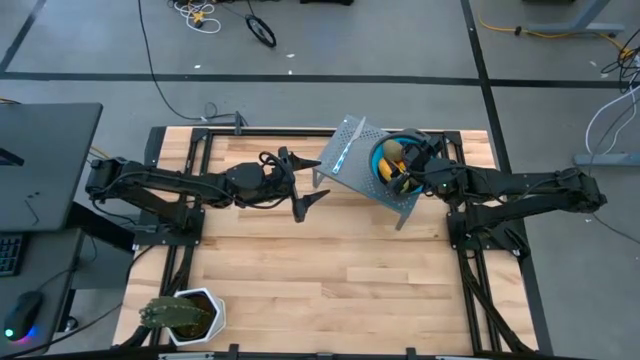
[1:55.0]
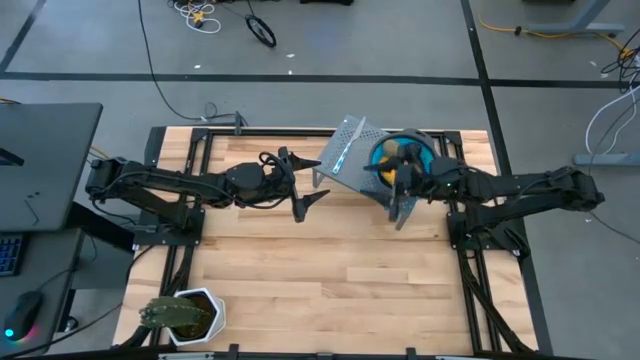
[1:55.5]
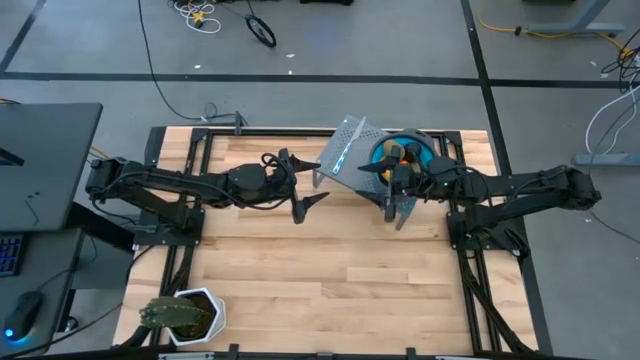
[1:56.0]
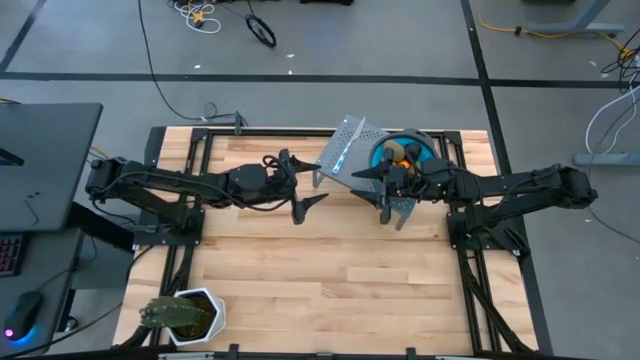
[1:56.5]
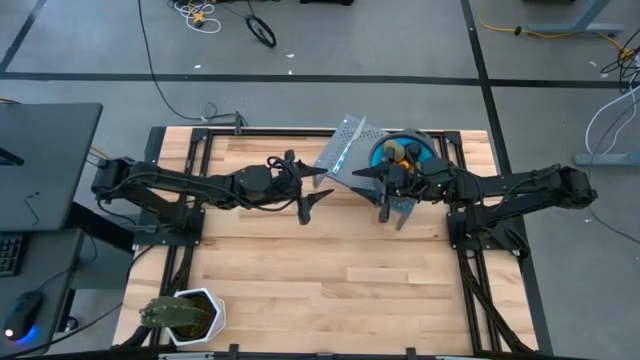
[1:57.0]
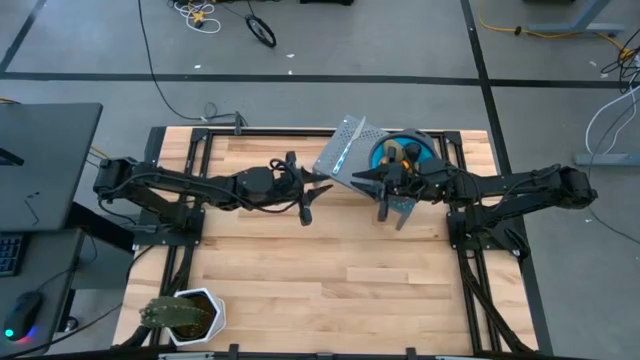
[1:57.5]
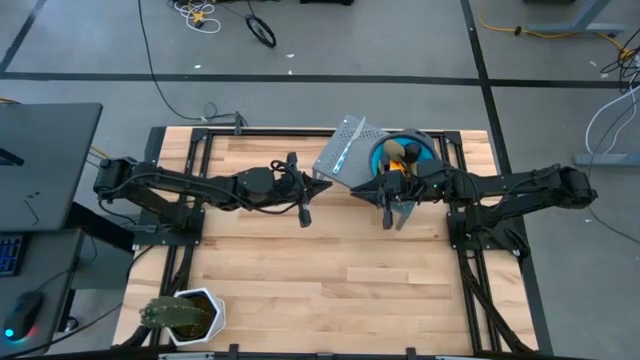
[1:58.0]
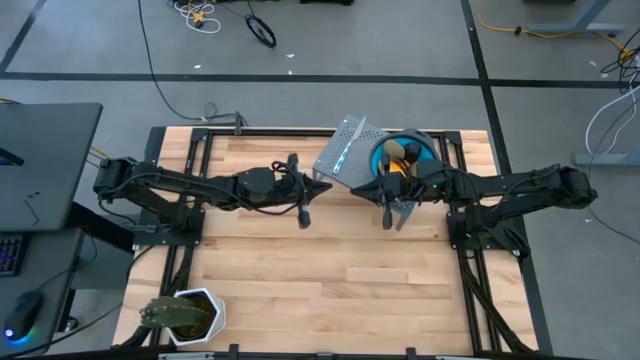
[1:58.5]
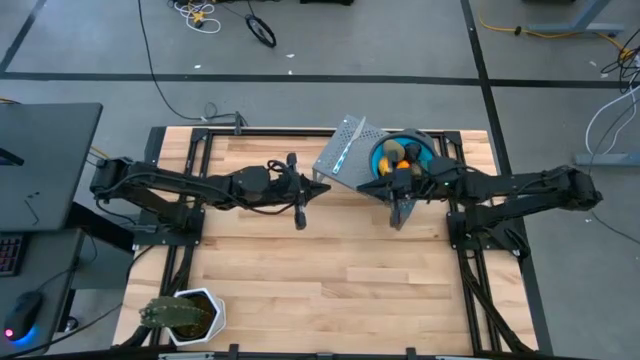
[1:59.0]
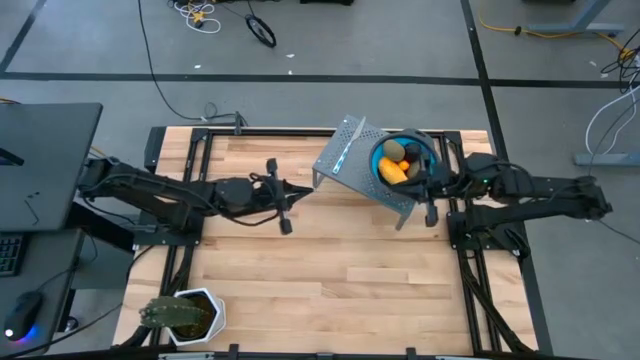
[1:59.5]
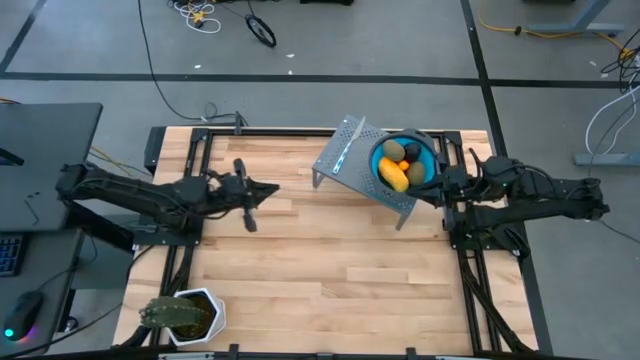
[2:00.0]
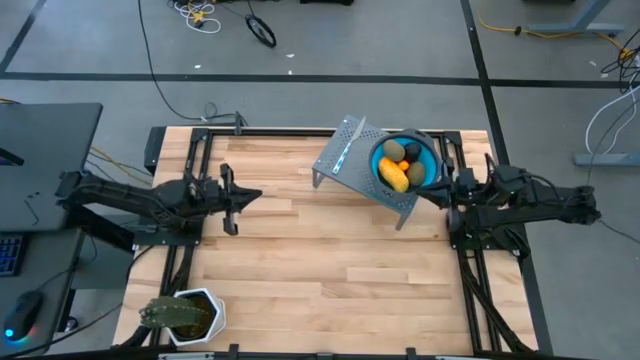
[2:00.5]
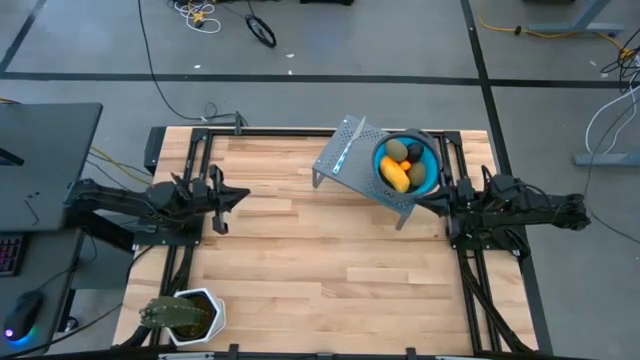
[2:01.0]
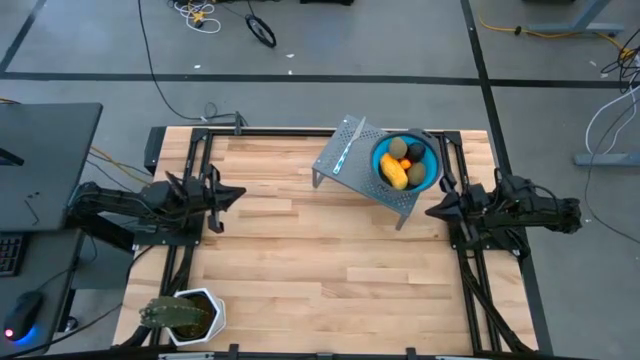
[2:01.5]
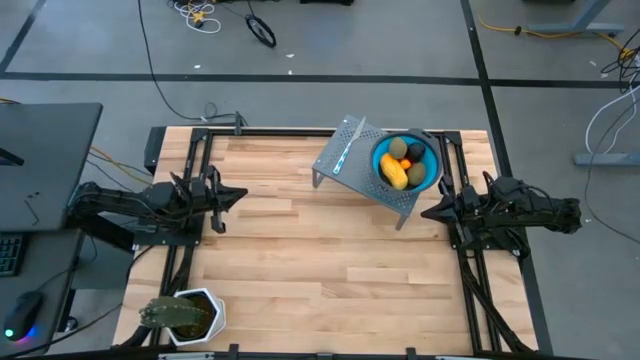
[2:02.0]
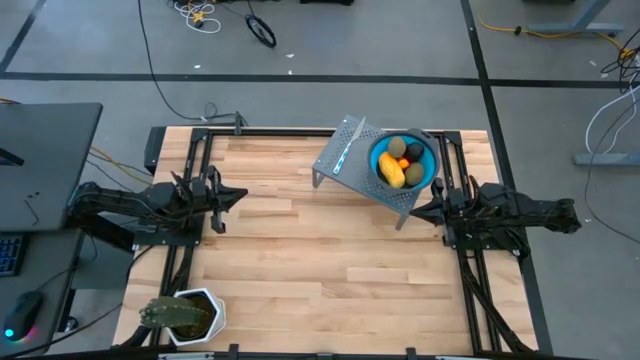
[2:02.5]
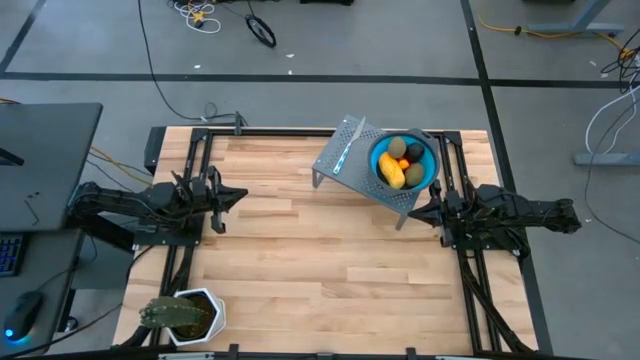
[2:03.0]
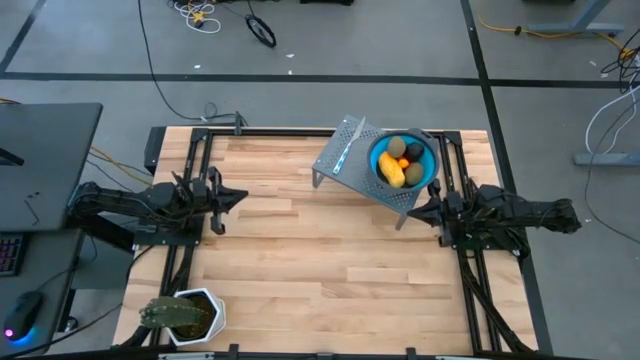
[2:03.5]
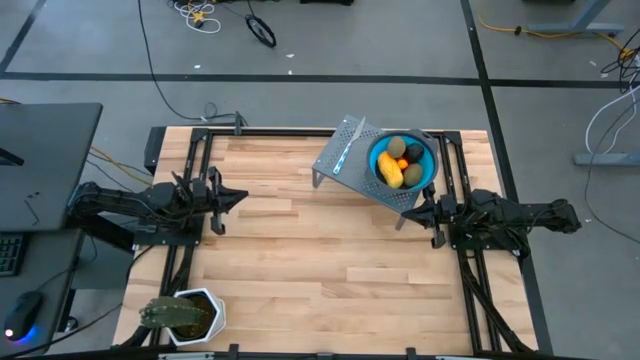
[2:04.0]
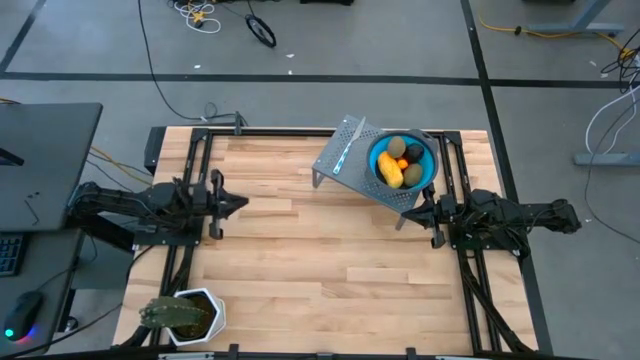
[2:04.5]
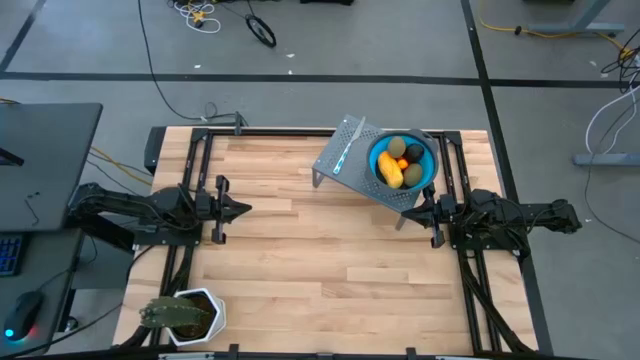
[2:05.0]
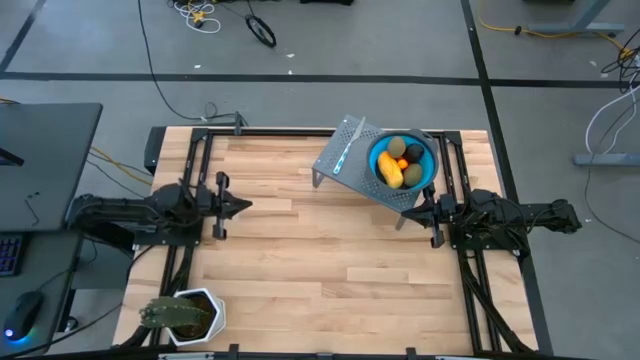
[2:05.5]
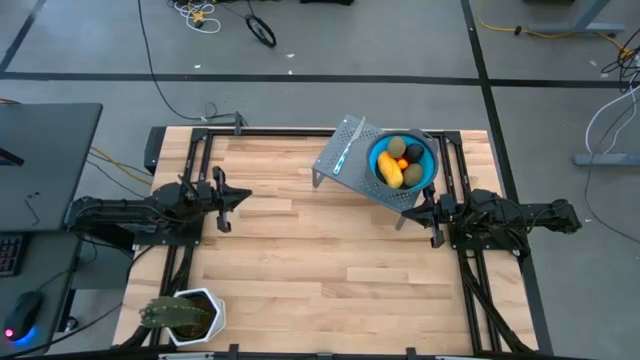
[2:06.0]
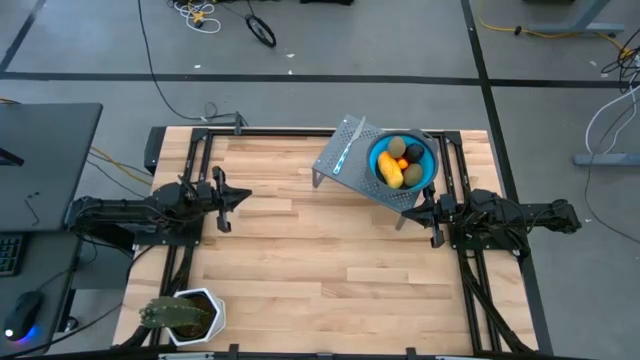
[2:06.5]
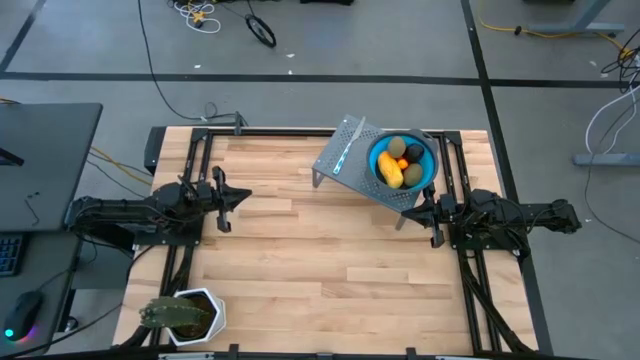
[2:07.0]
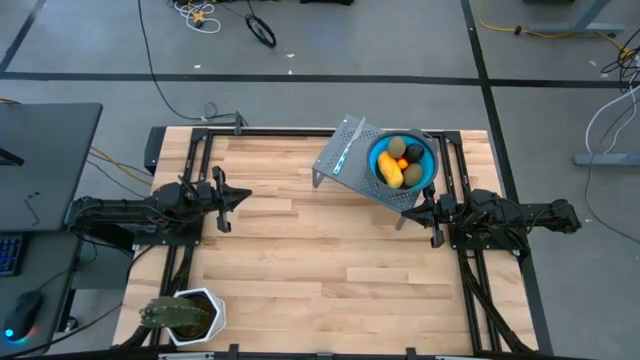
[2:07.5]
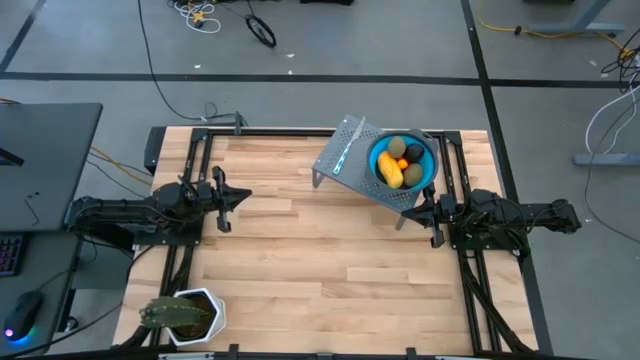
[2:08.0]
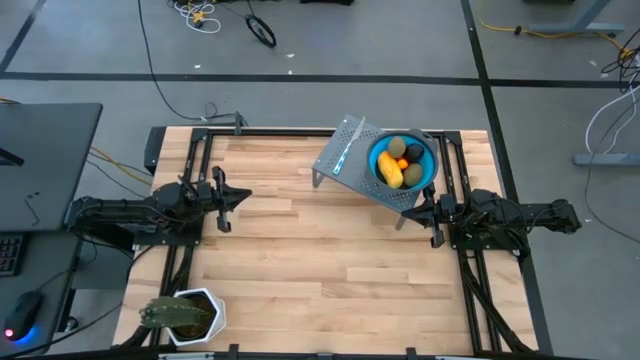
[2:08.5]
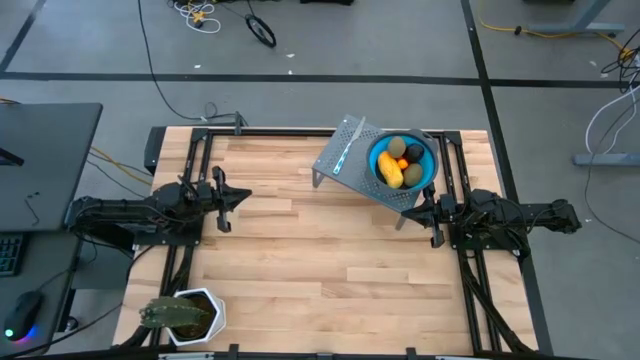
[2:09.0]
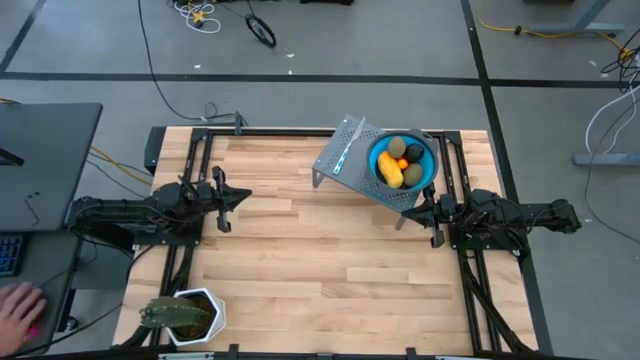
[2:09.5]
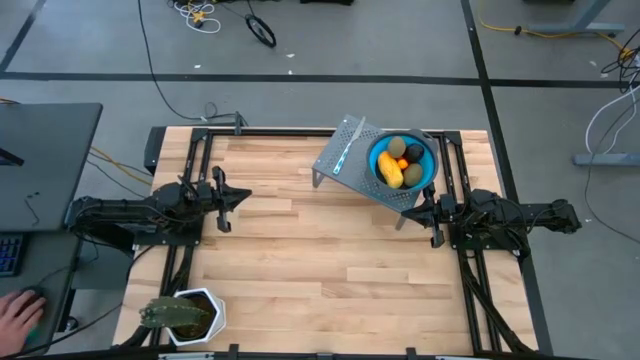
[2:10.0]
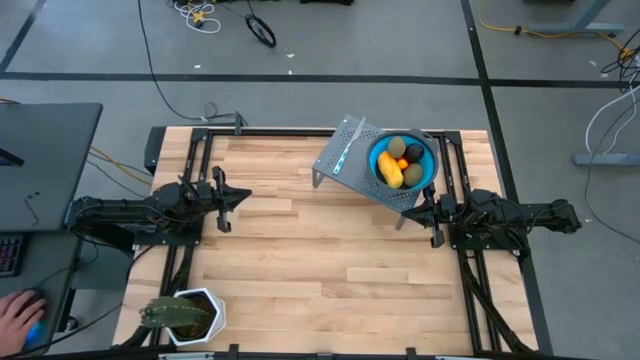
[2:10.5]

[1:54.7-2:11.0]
Task: Pick & Place Fruit
Return to Home Position

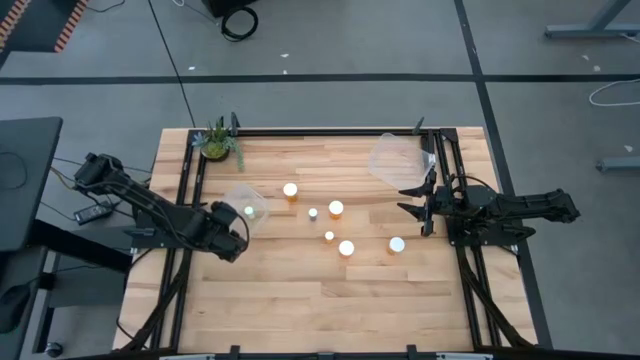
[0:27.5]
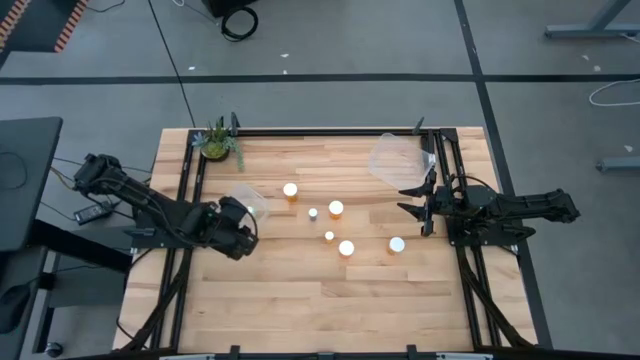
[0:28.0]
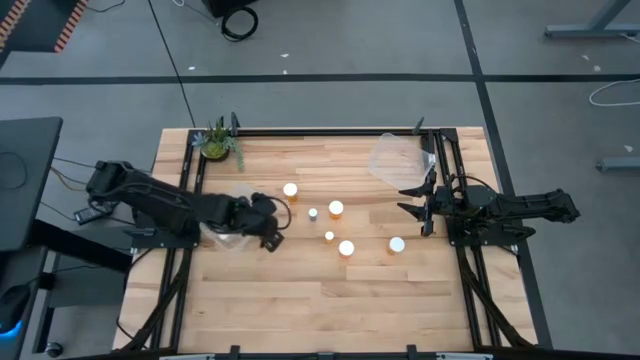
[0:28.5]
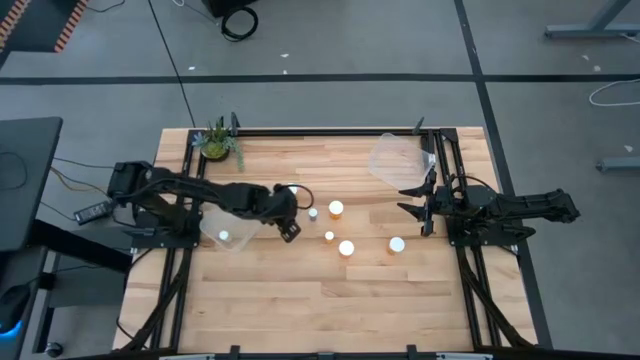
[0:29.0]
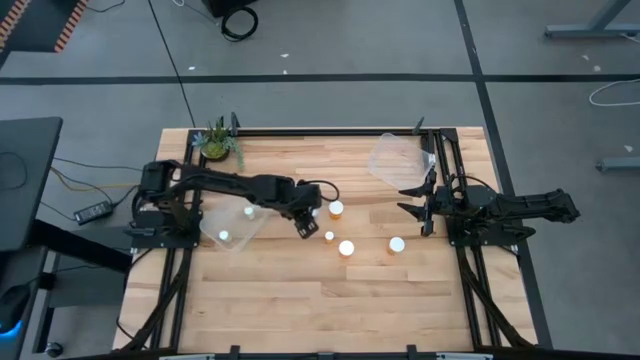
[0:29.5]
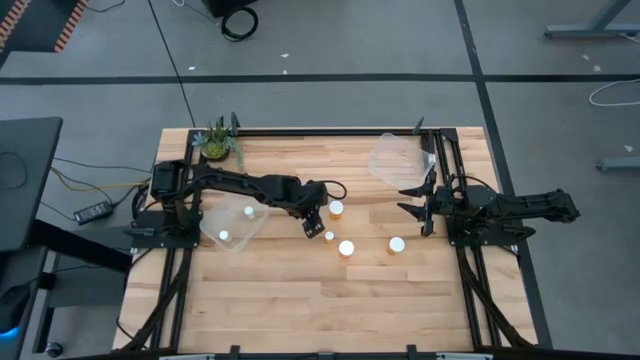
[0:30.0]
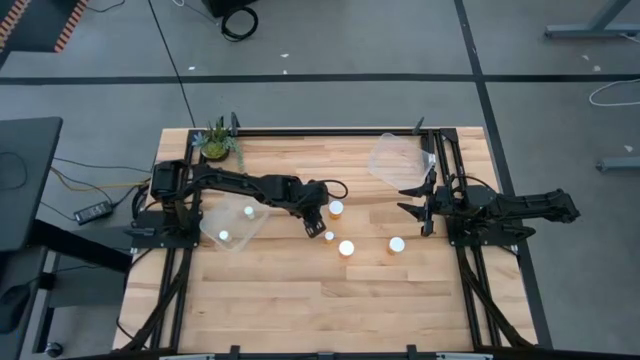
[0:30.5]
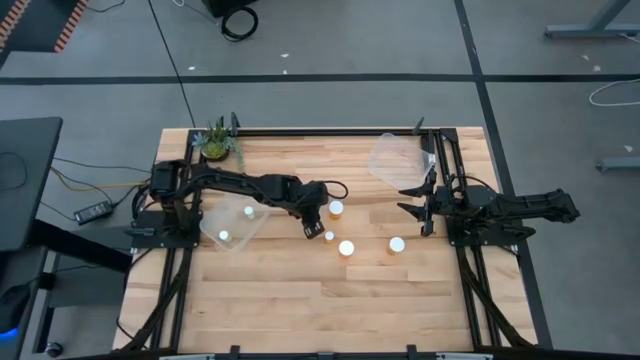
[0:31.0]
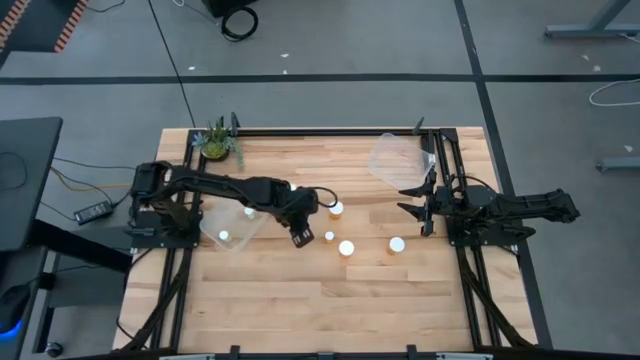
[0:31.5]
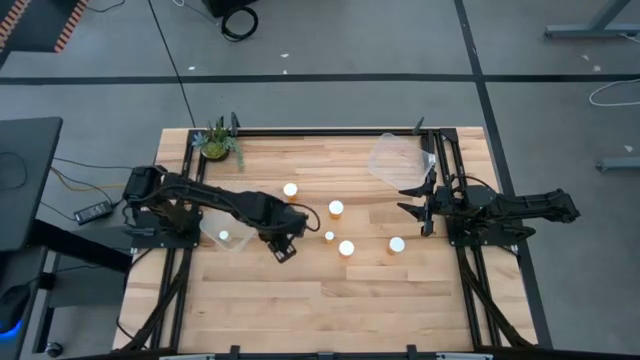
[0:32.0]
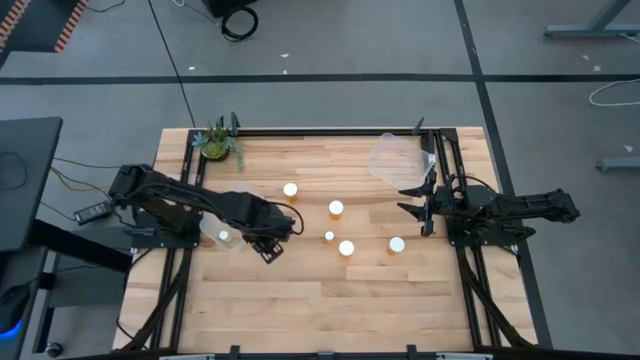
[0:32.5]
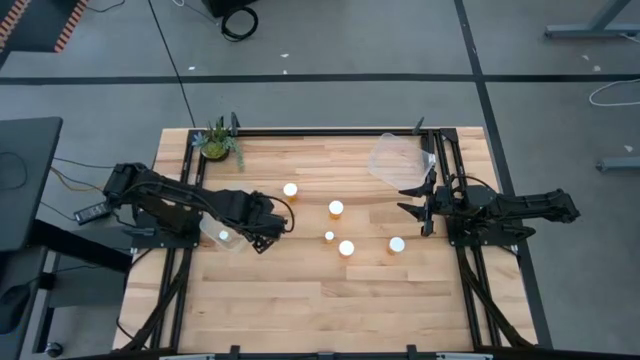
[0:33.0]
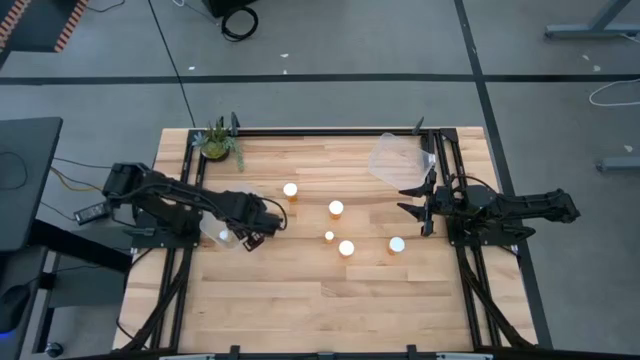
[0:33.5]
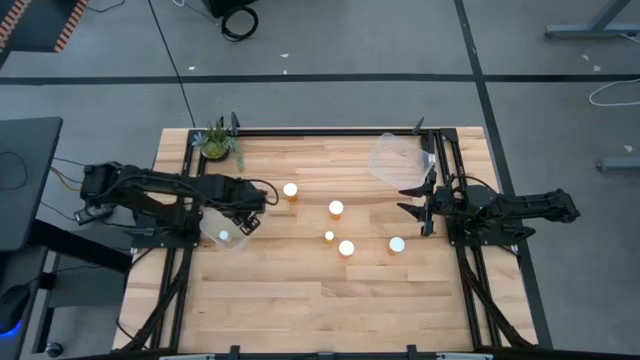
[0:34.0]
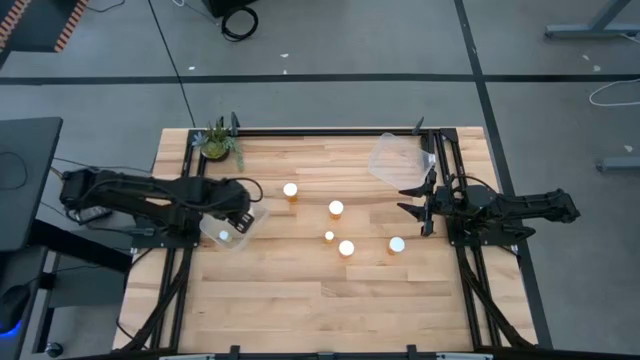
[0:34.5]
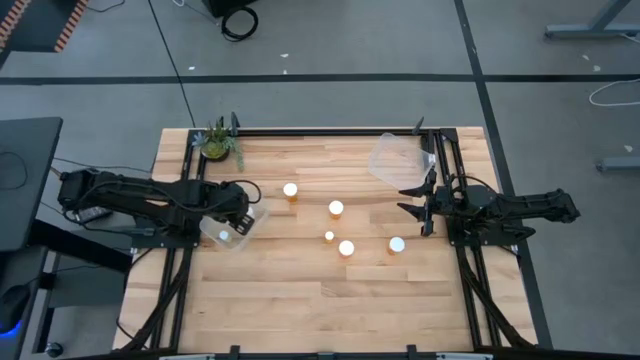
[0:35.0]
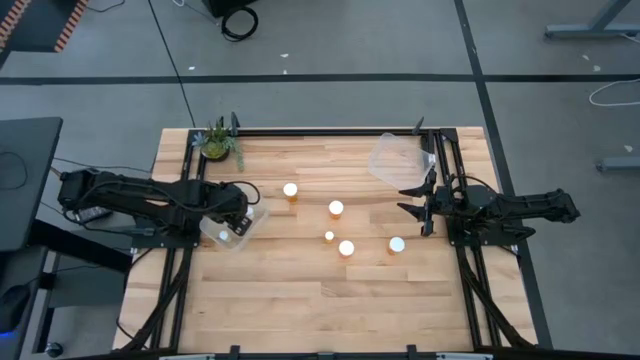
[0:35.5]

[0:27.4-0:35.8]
Task: Pick and place medicine bottles into bin by pill shape (circle, oval)
Put the small blue pill bottle into the left transparent bin
